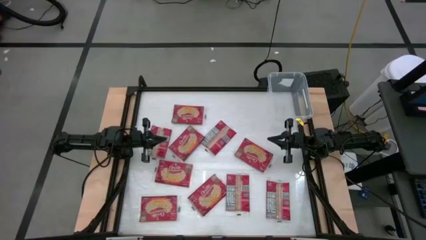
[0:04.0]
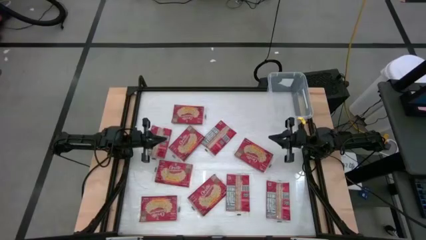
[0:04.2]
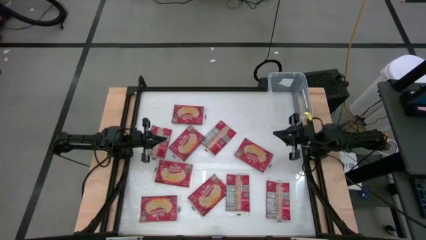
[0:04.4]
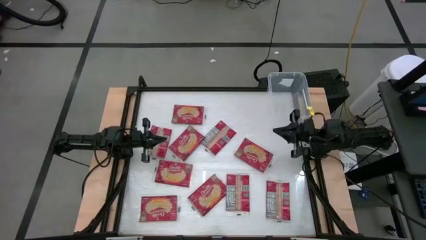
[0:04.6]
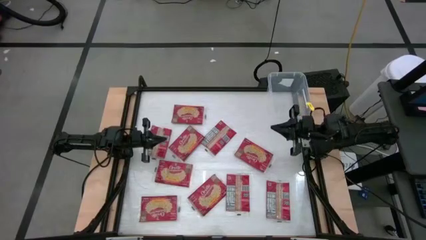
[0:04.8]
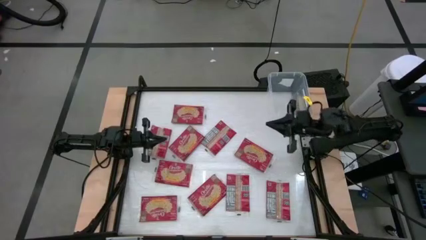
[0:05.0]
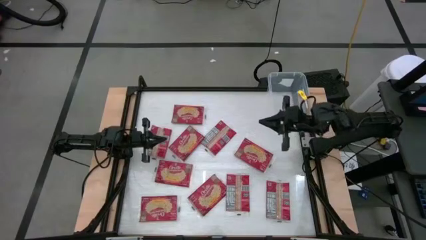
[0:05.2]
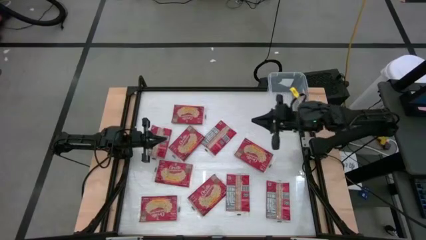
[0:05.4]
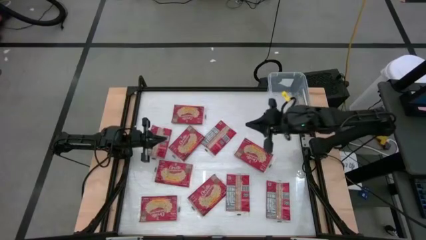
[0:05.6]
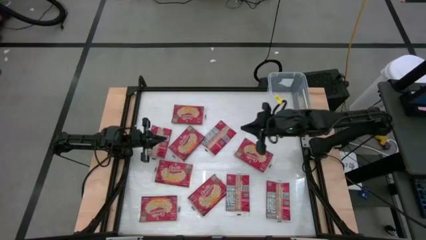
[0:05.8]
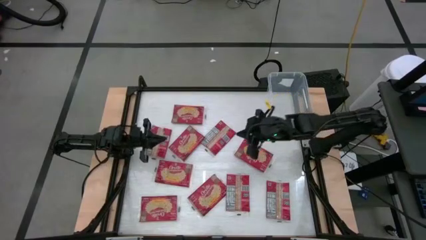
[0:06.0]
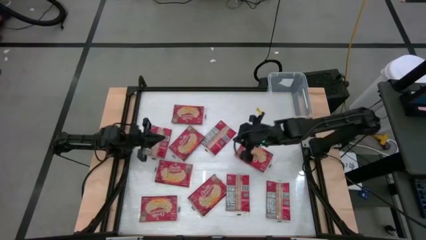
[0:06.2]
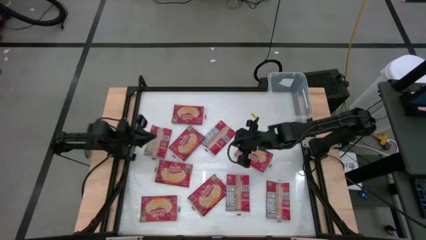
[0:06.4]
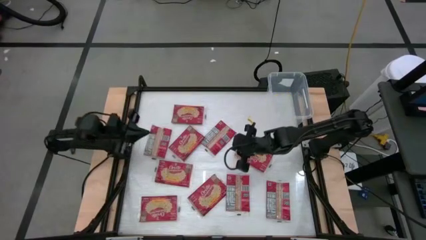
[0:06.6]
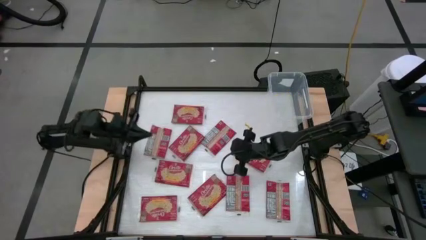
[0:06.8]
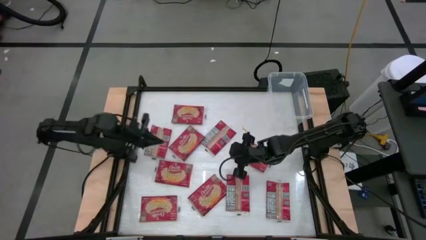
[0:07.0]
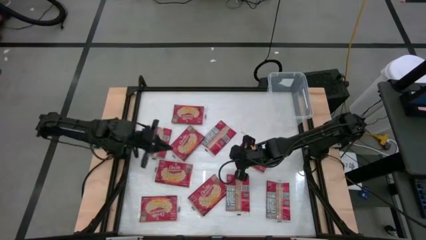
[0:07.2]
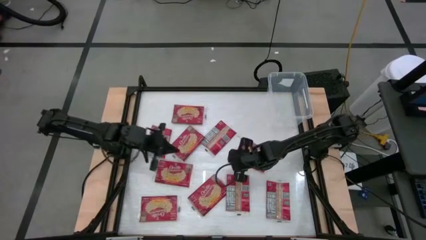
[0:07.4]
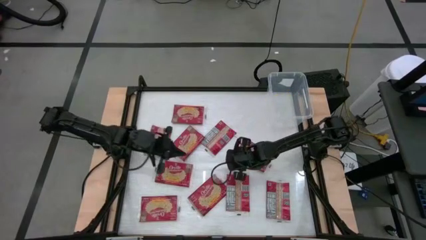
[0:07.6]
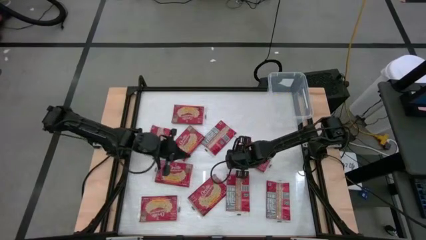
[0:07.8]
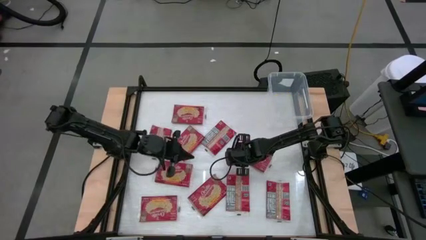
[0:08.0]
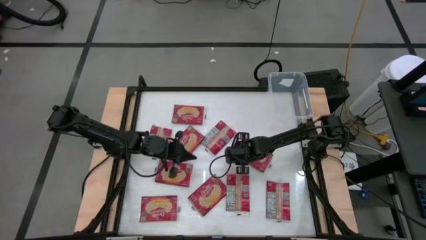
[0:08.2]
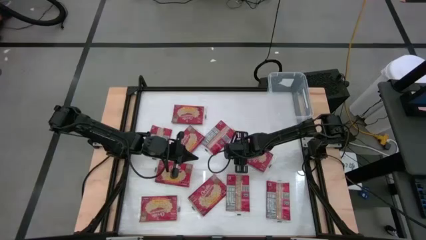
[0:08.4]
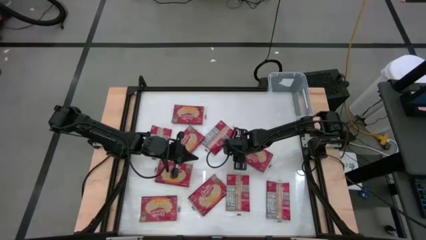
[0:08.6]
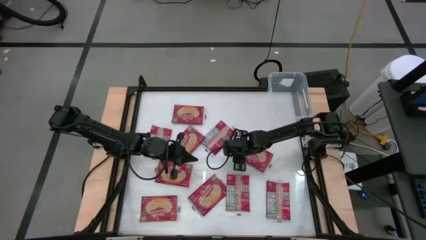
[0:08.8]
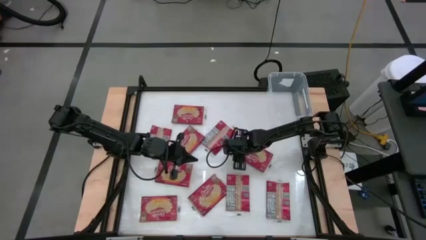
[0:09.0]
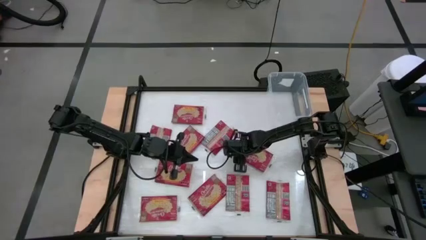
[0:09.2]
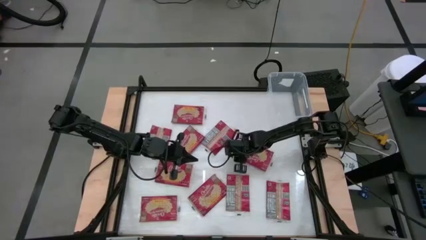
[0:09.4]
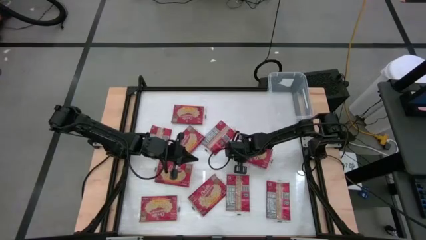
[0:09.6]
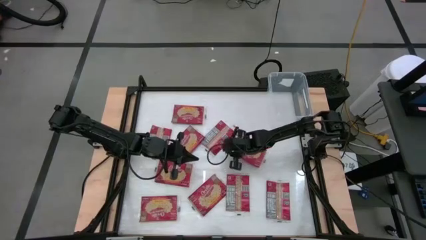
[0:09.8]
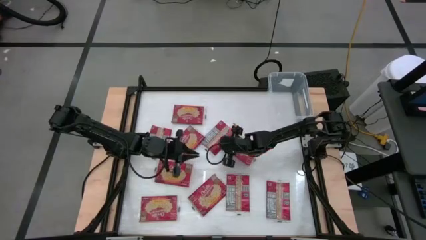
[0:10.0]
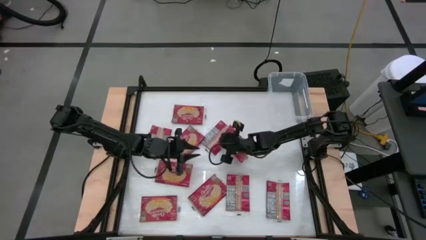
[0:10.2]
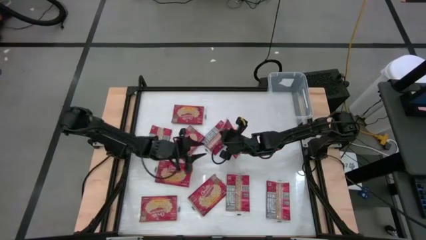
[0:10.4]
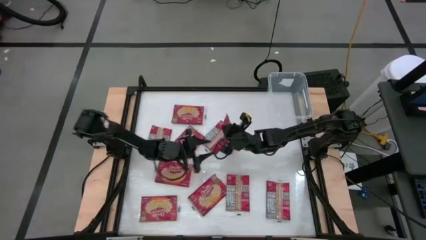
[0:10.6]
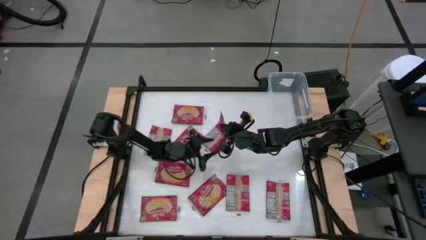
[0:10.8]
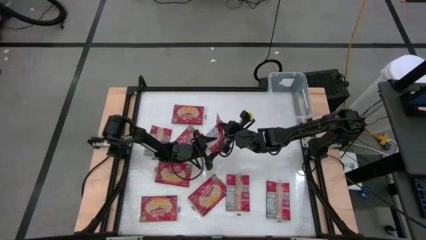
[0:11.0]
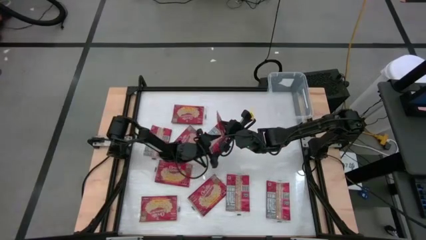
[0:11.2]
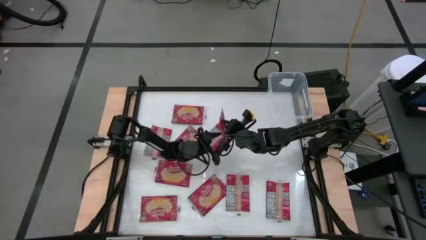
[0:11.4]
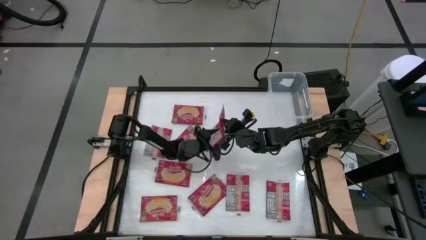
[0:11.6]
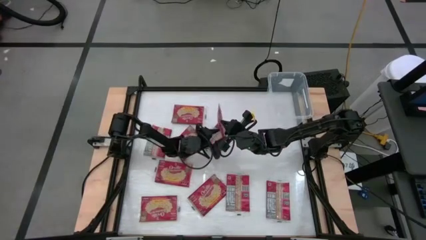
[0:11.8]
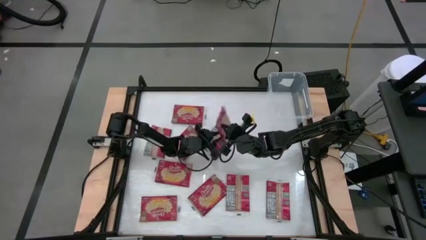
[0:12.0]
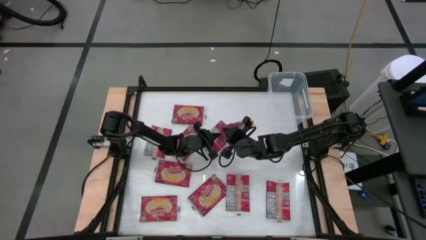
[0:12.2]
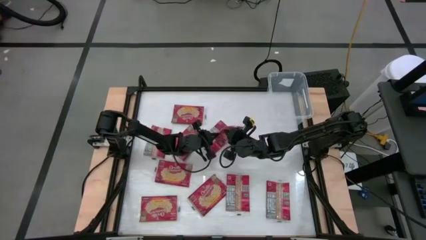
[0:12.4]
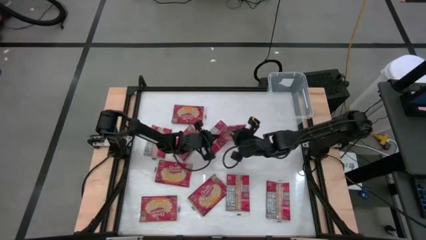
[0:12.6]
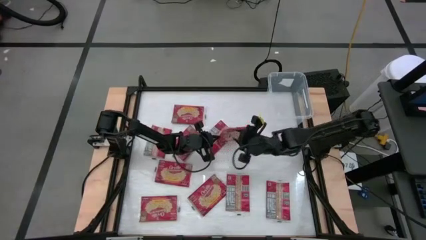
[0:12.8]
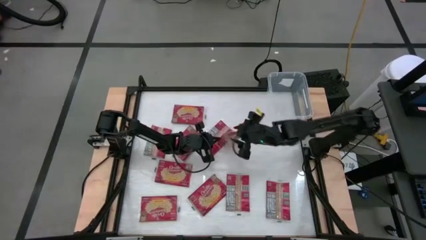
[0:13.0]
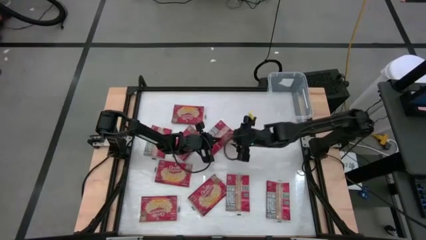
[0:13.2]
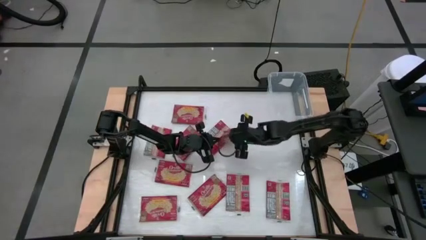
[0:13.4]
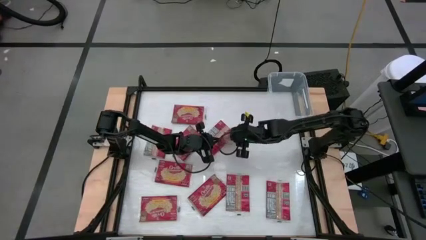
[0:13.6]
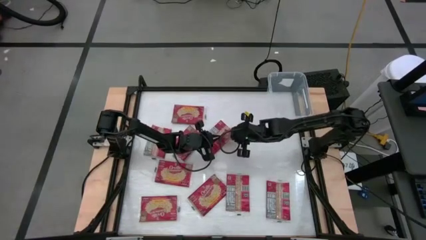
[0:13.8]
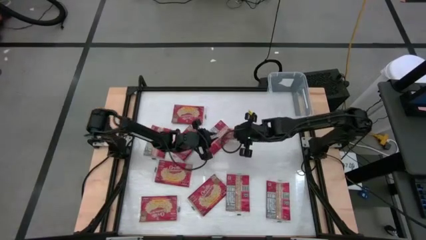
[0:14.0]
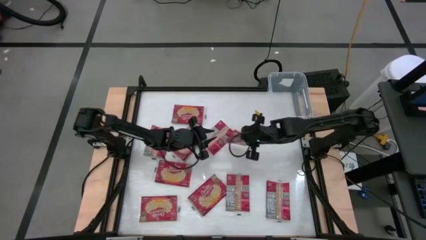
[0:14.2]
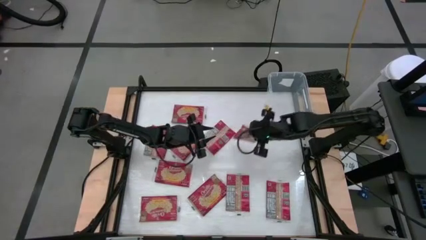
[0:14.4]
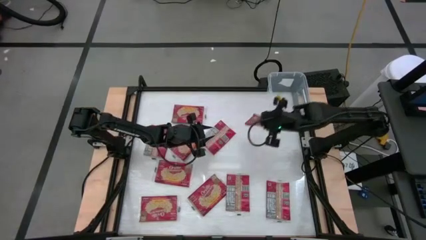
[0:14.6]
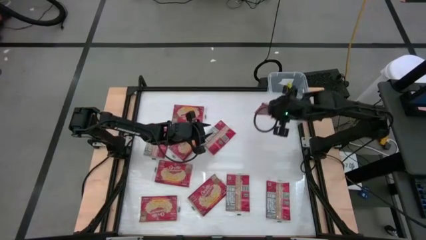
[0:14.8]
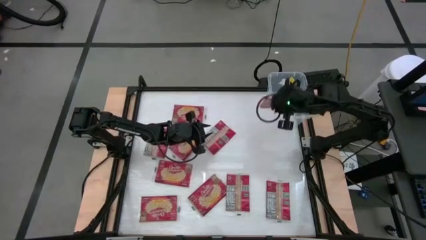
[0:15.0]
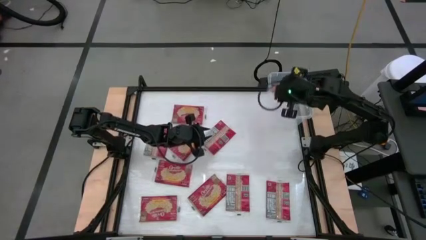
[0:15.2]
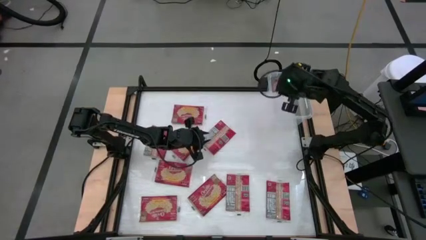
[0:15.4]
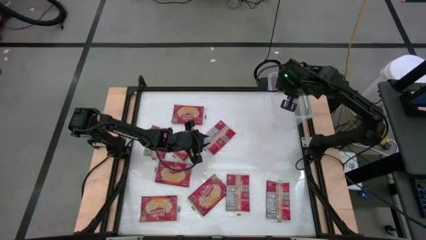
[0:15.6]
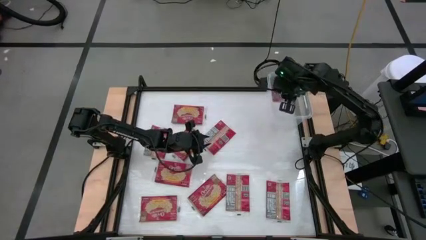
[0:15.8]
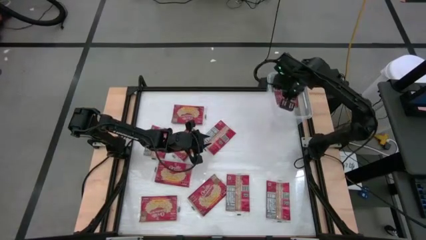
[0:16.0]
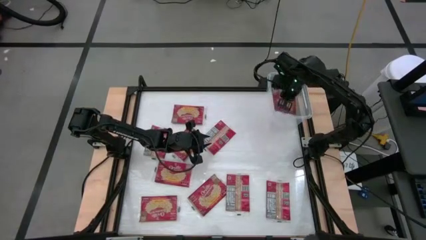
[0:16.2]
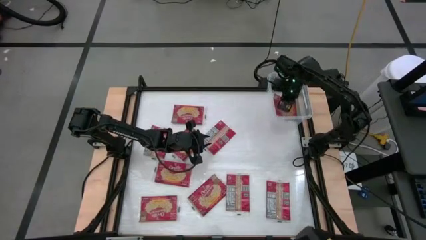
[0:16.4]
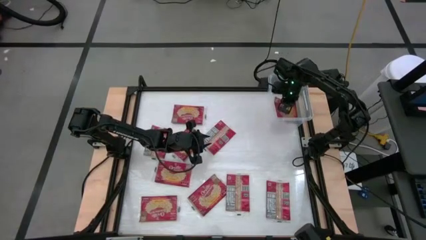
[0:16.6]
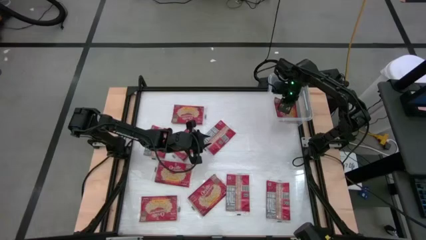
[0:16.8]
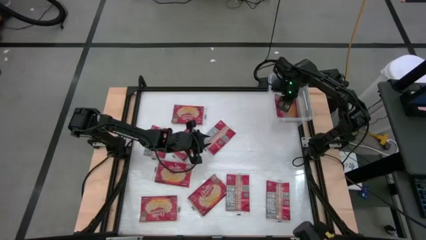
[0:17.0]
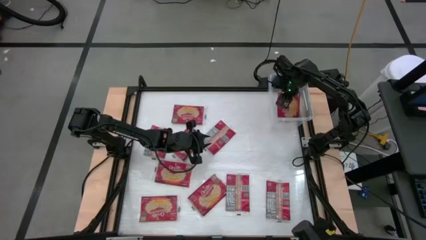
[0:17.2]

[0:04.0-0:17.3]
Task: Sort popcorn bags into baskets
Put the red popcorn bag into the transparent container
